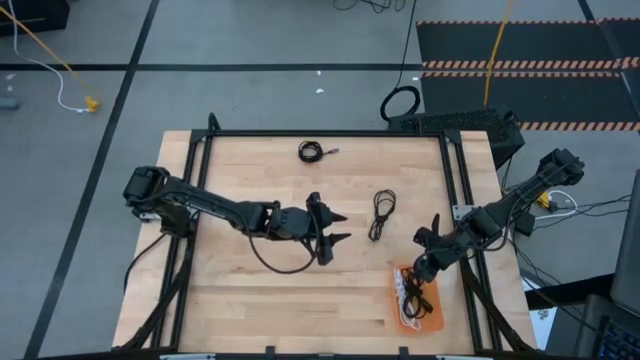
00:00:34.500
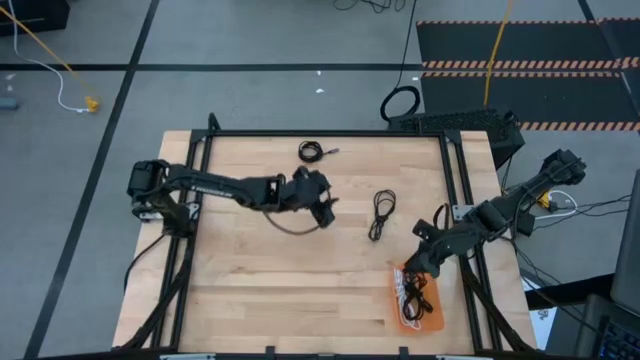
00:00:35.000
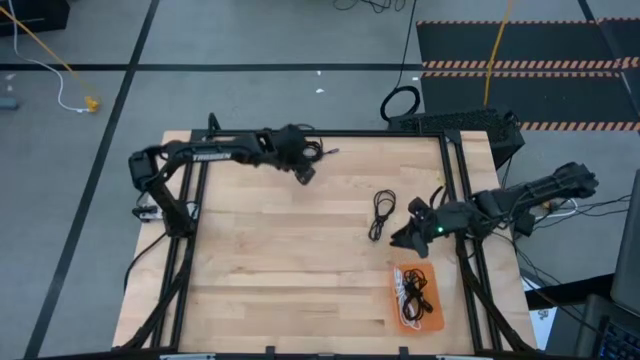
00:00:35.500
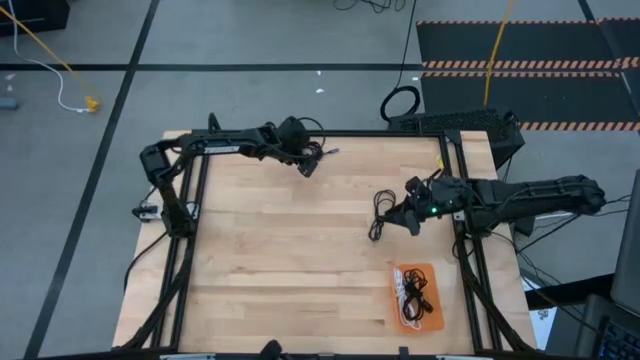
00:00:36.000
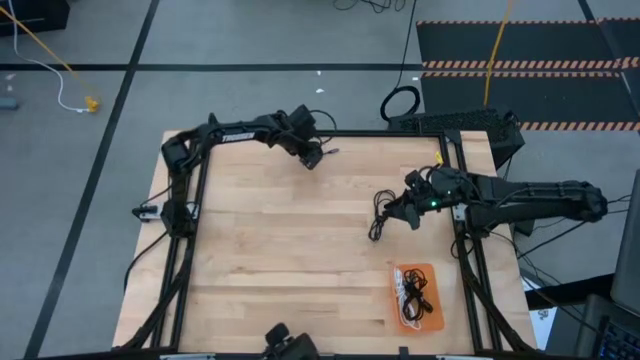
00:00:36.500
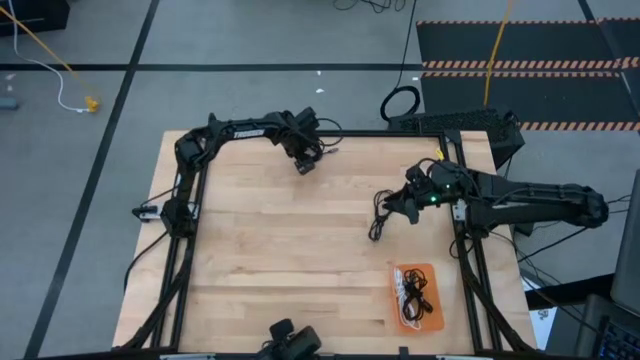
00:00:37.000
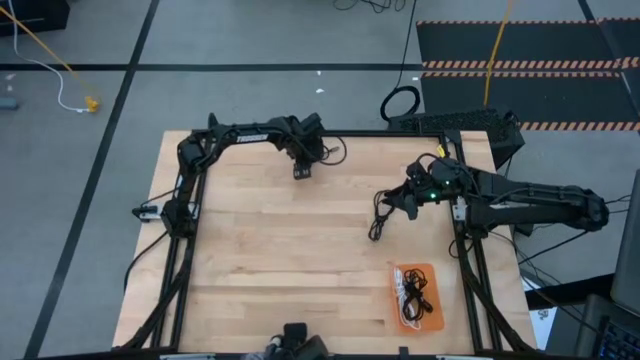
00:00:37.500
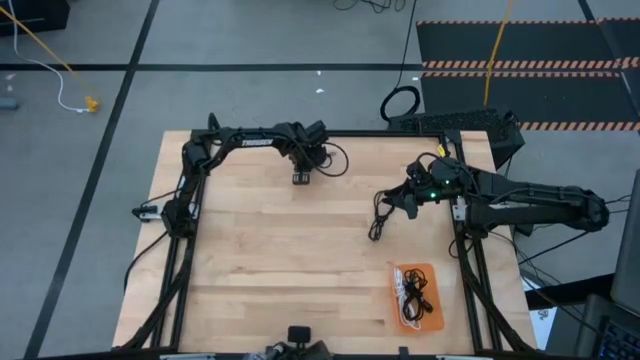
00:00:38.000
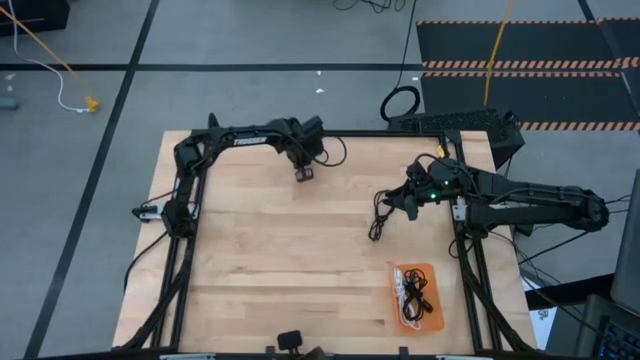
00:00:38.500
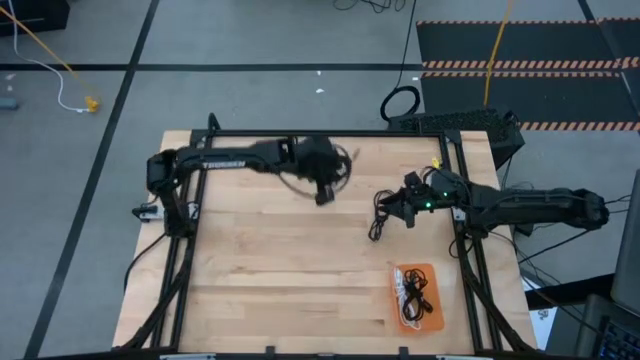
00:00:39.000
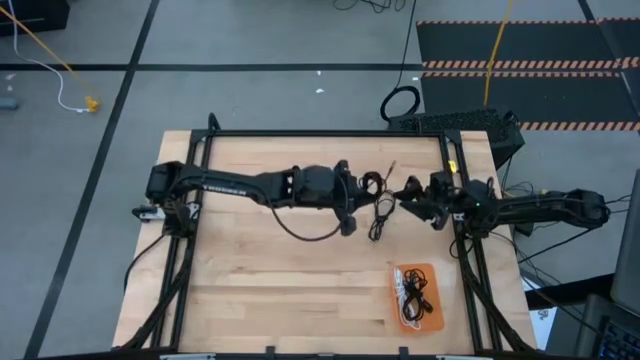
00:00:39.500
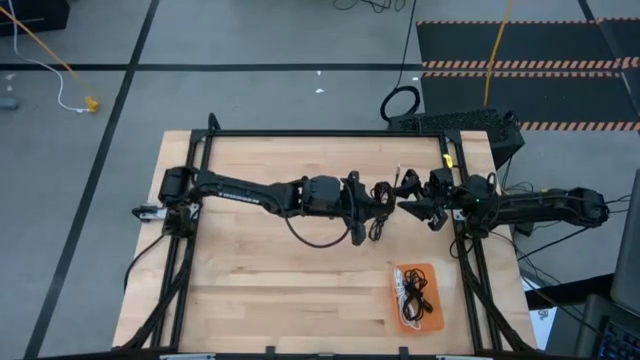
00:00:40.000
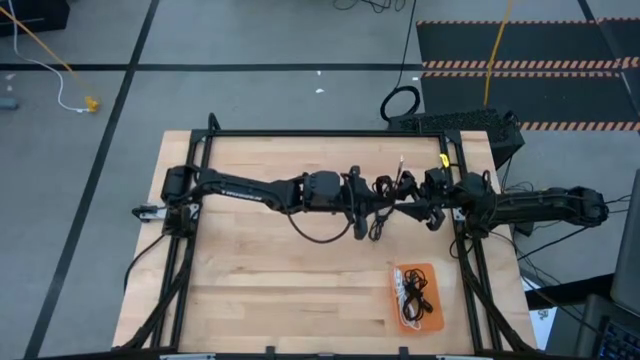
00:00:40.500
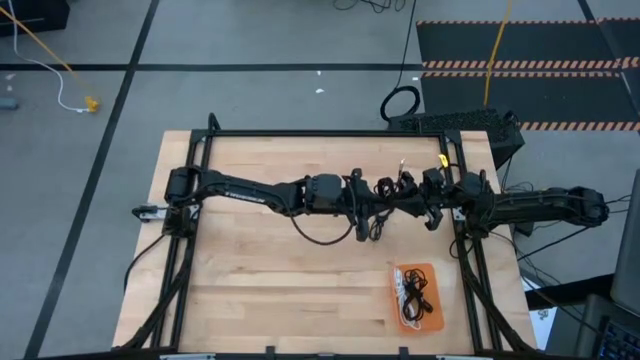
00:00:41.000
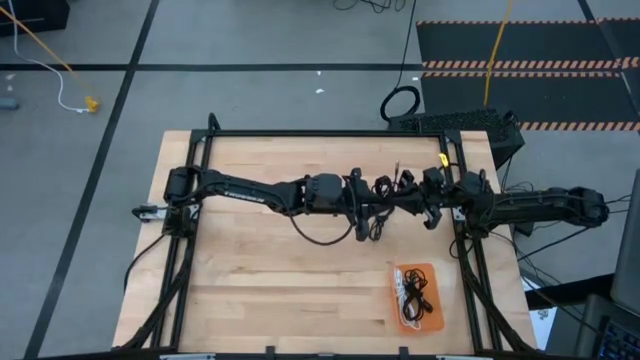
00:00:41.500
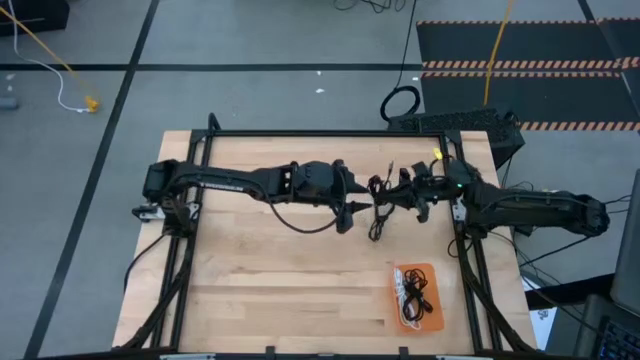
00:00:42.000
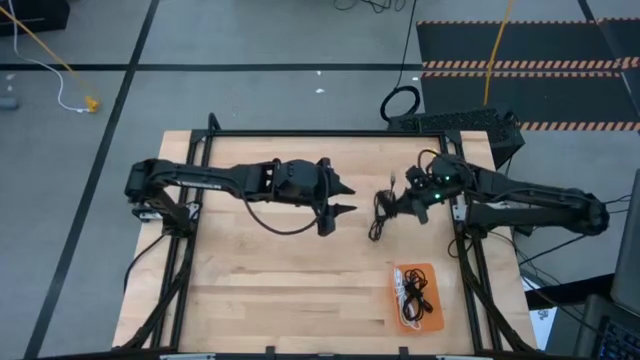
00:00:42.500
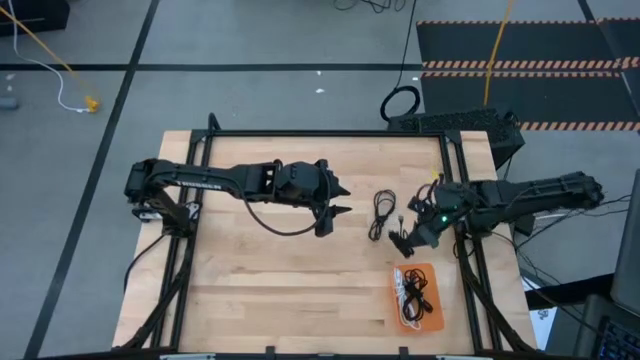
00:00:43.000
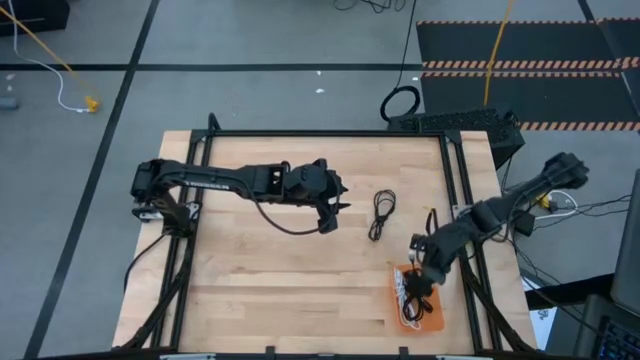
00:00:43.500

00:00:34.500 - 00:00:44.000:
Task: Pick and place USB-C Cables
Put the top black charger cable into the bin

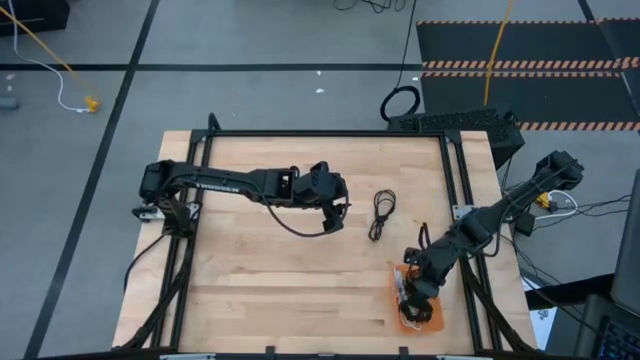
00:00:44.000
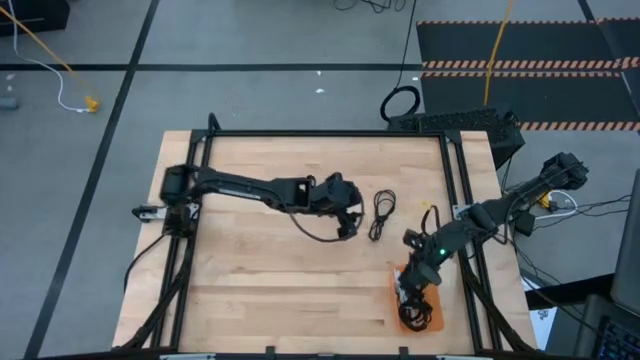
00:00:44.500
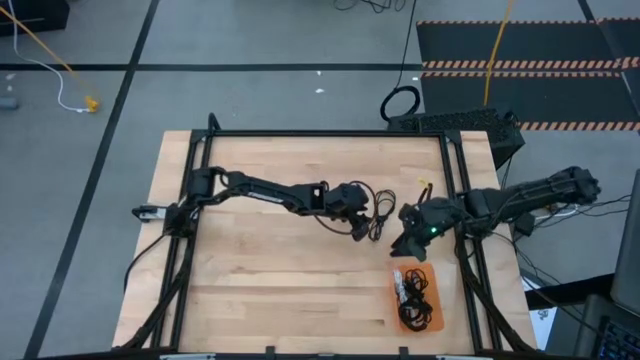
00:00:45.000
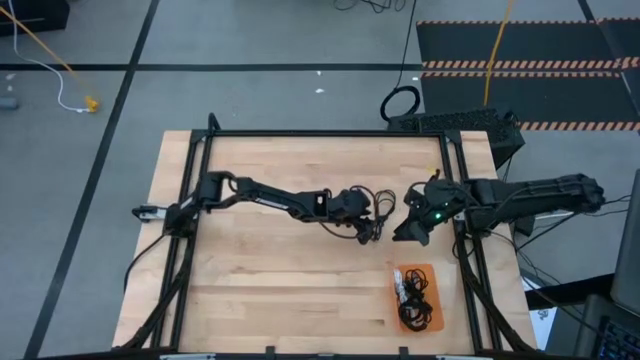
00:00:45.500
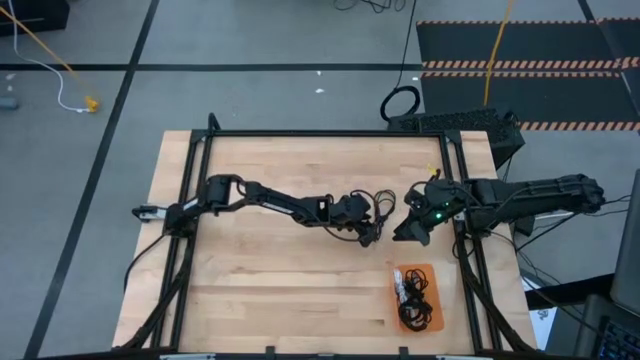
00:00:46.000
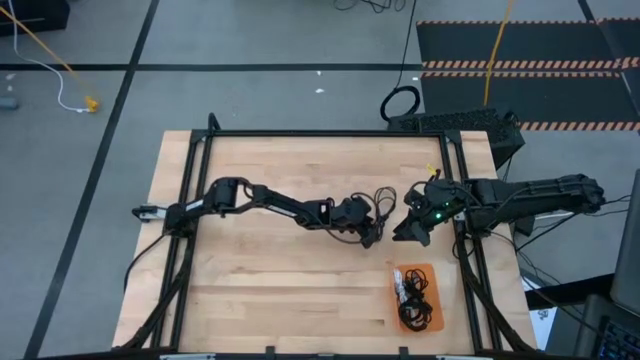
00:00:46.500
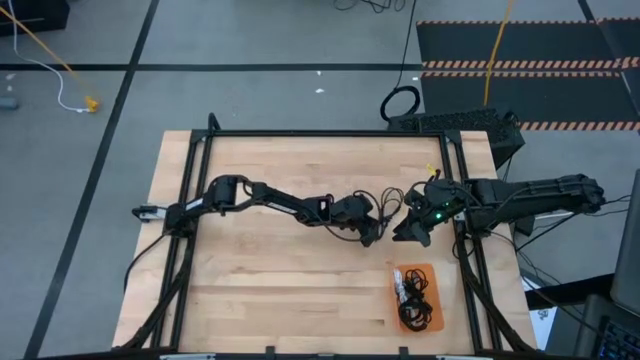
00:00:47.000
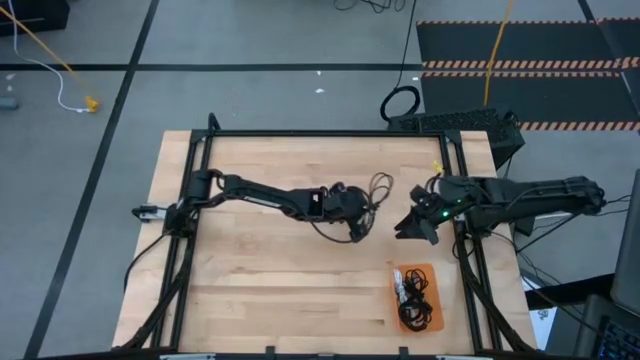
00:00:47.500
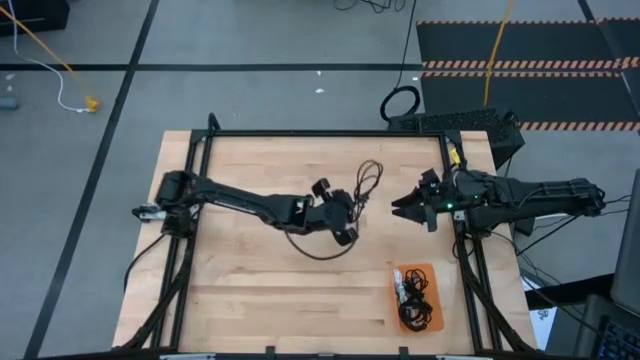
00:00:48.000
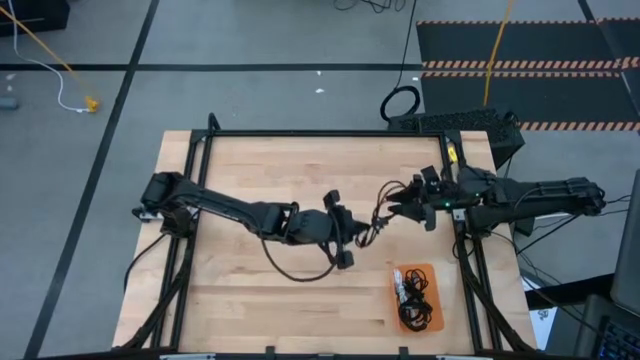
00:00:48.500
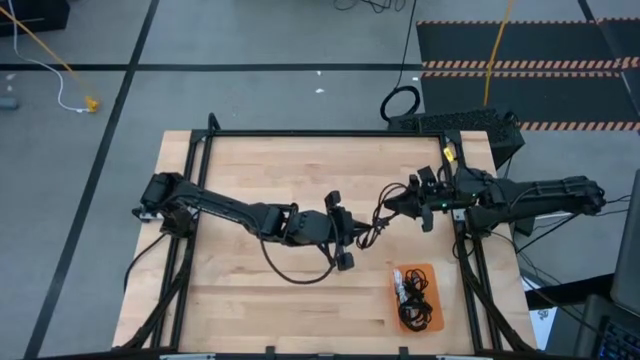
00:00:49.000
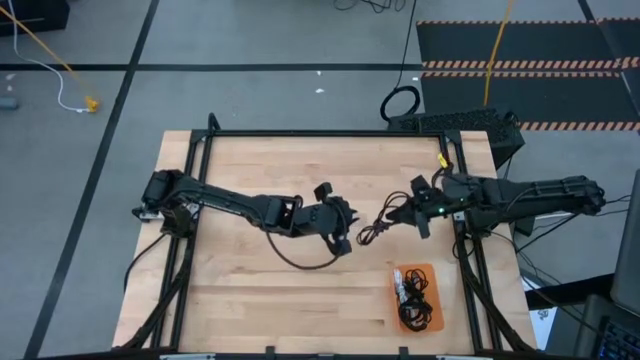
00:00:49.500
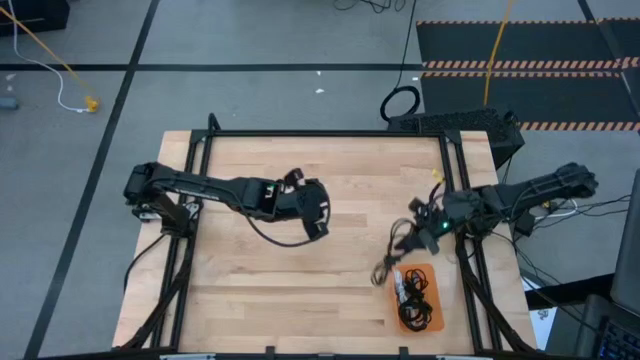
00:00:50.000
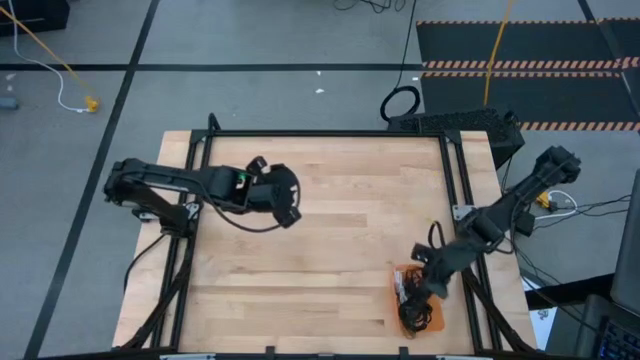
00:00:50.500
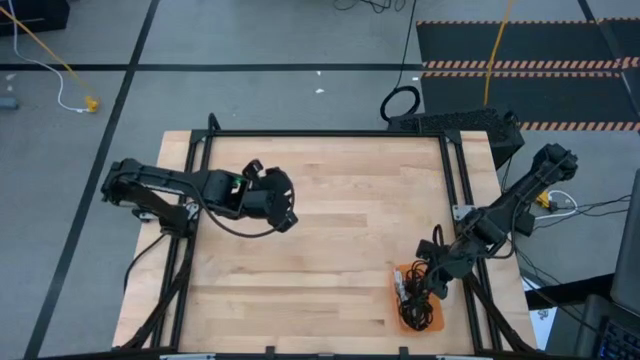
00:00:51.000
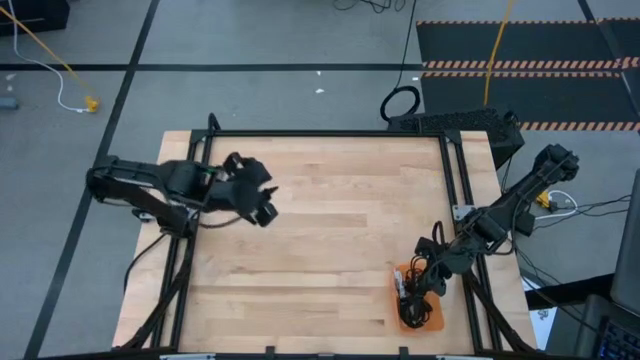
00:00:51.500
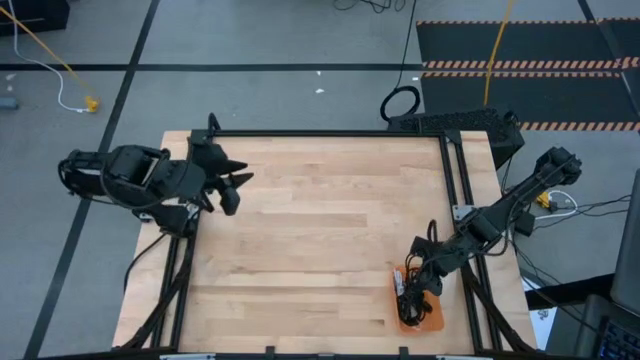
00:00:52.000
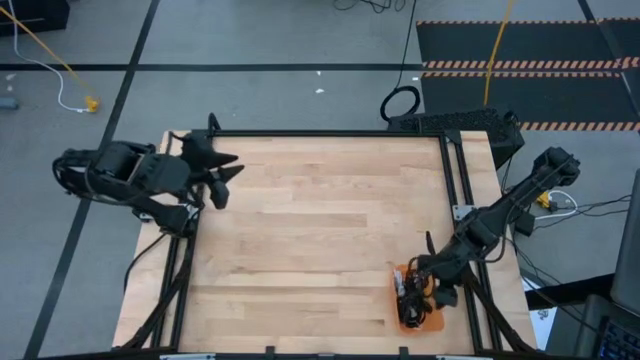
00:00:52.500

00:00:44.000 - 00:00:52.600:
Put the black charger cable into the orange bin

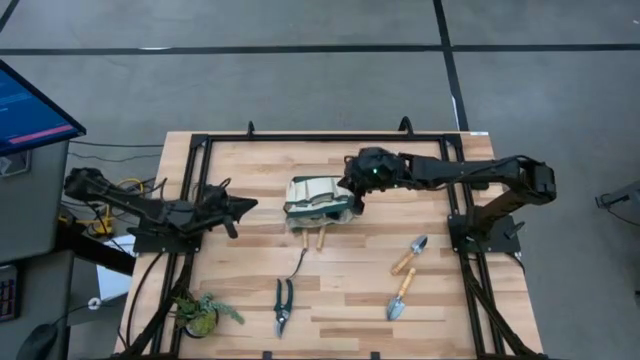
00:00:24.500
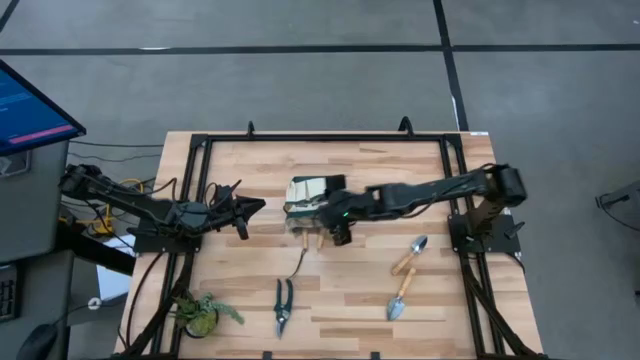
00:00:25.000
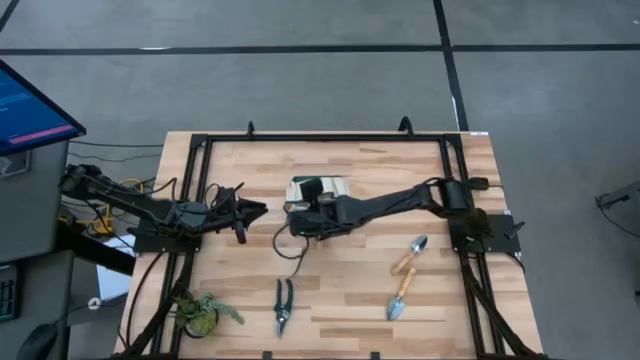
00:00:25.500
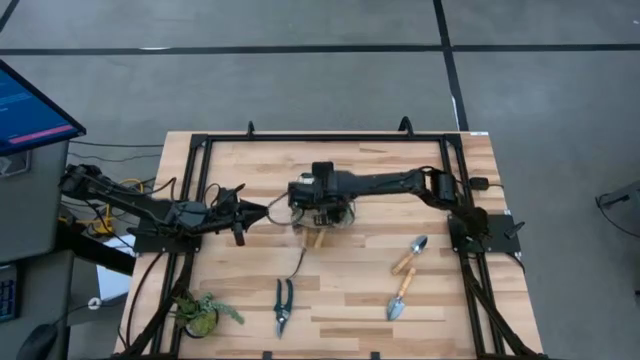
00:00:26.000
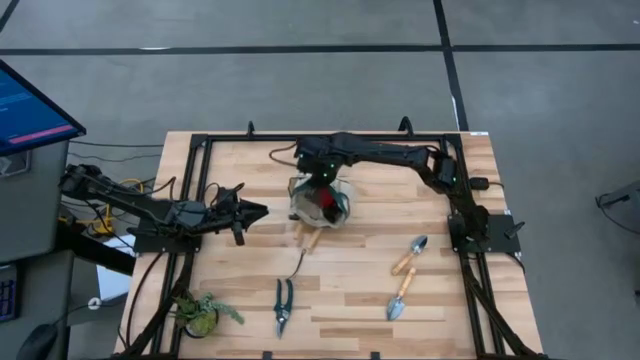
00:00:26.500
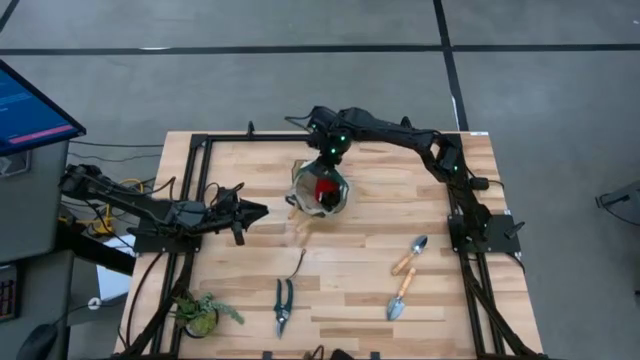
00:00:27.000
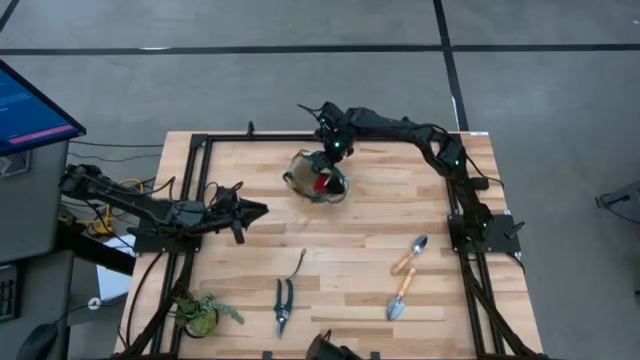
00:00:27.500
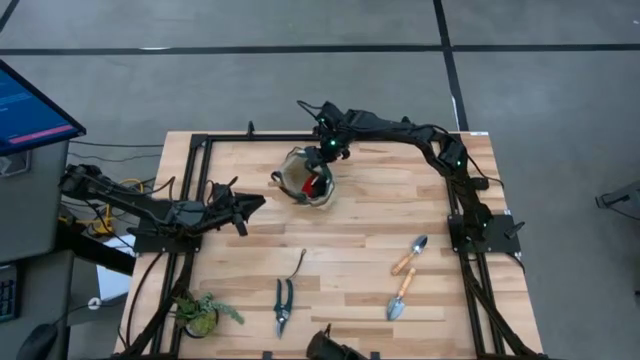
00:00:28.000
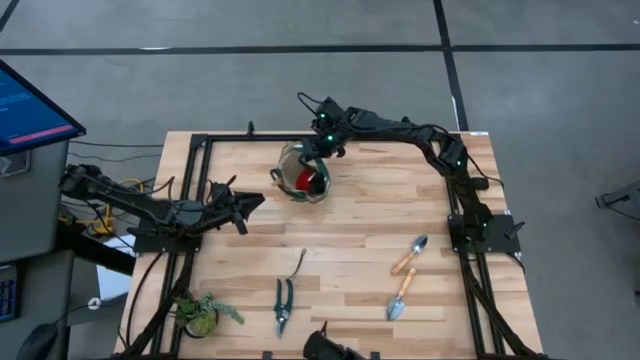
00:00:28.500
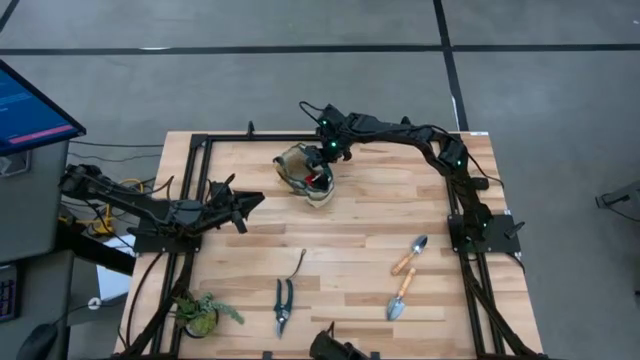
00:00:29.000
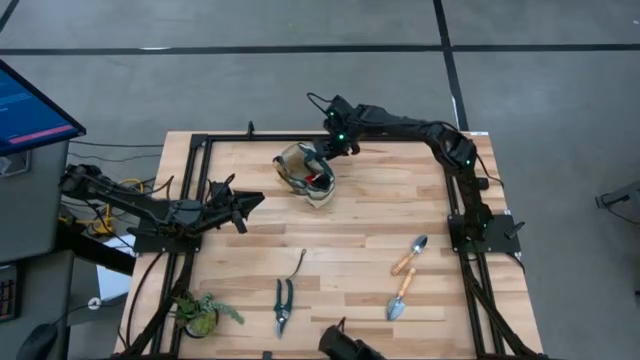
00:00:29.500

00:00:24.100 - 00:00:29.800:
Task: Pick & Place Garden tools in Gardening bag
Adjust the white gardening bag on the table
